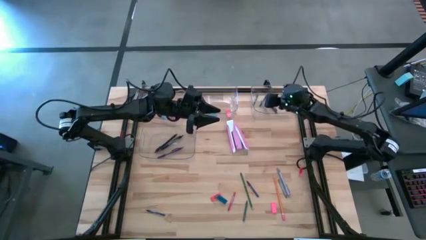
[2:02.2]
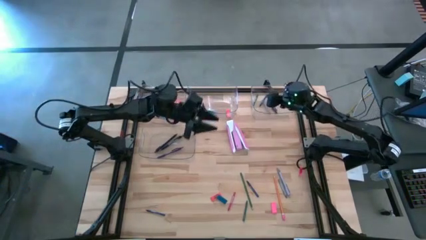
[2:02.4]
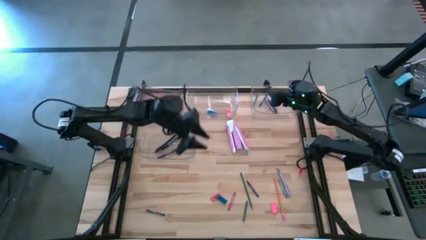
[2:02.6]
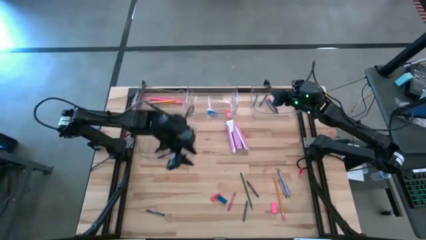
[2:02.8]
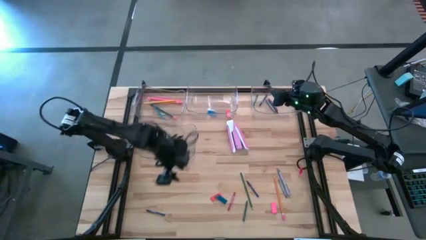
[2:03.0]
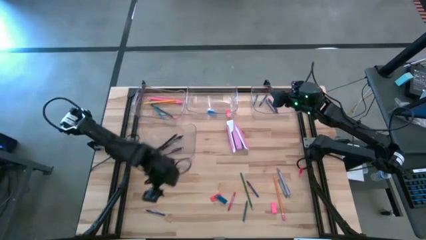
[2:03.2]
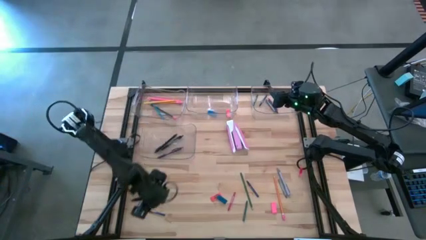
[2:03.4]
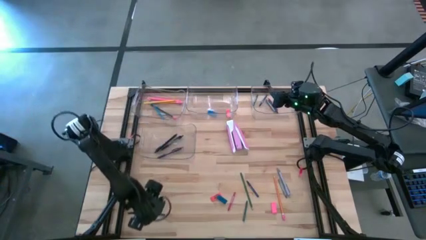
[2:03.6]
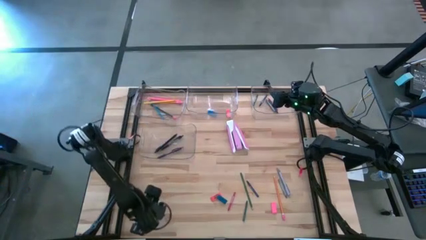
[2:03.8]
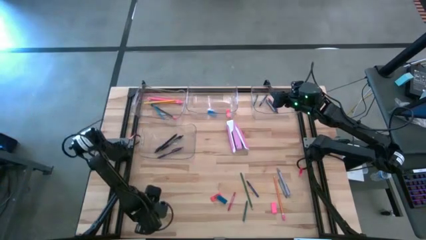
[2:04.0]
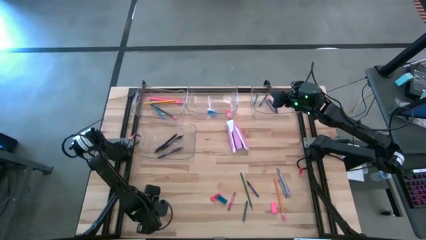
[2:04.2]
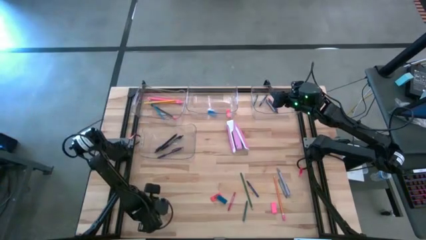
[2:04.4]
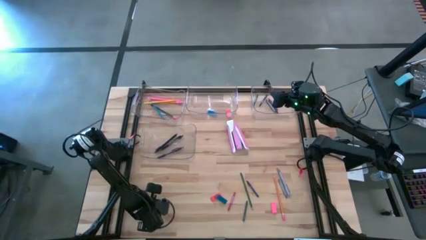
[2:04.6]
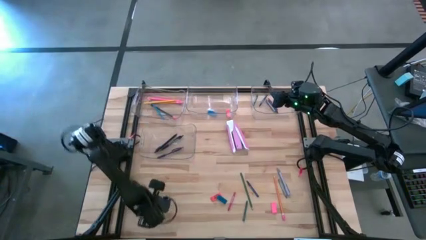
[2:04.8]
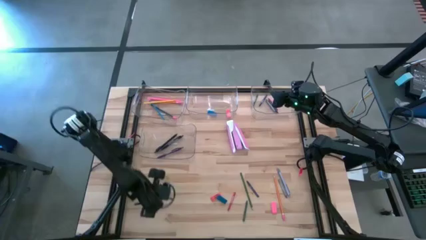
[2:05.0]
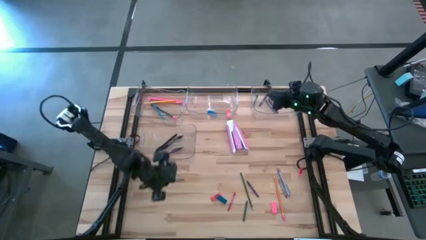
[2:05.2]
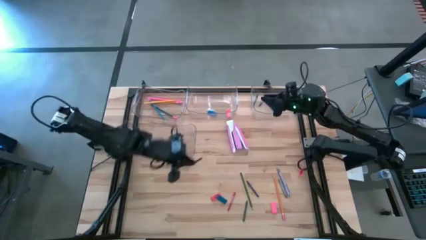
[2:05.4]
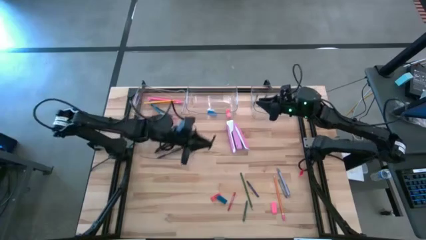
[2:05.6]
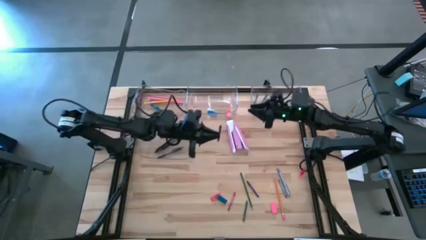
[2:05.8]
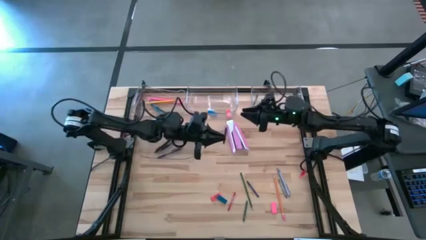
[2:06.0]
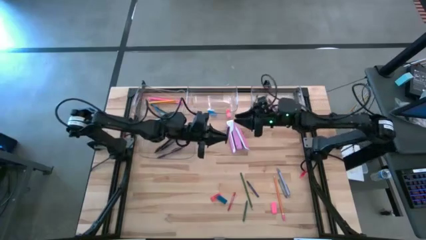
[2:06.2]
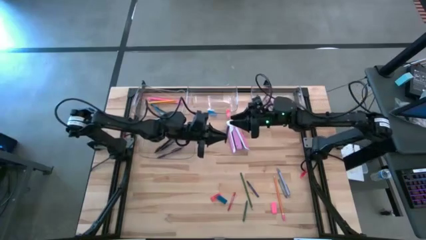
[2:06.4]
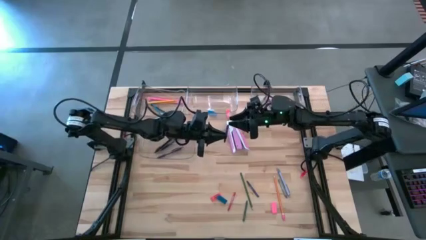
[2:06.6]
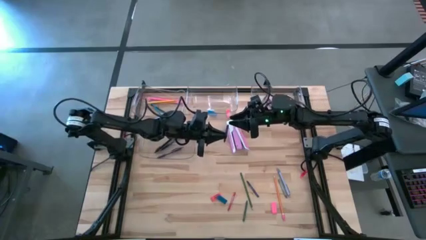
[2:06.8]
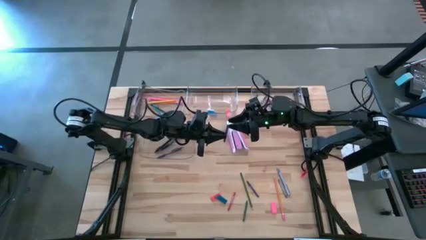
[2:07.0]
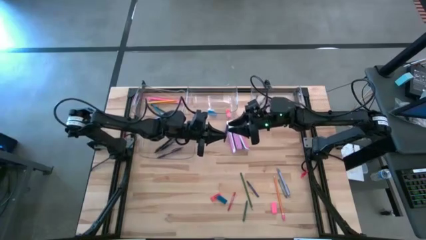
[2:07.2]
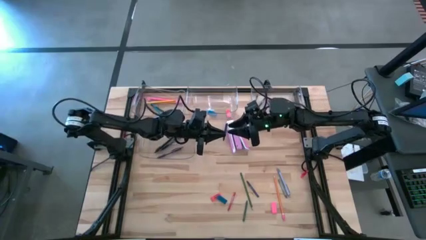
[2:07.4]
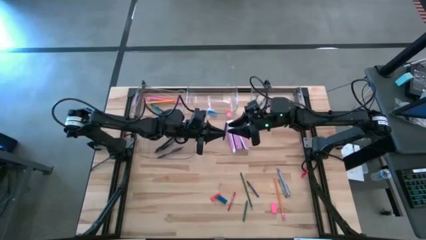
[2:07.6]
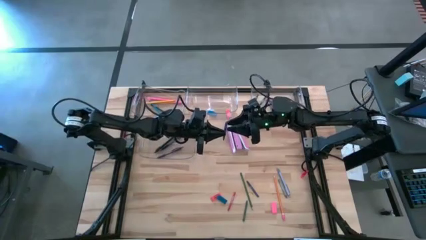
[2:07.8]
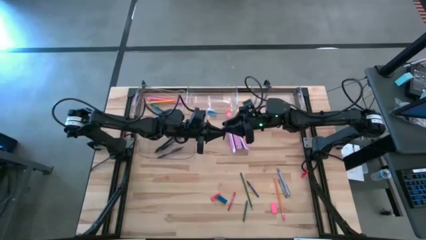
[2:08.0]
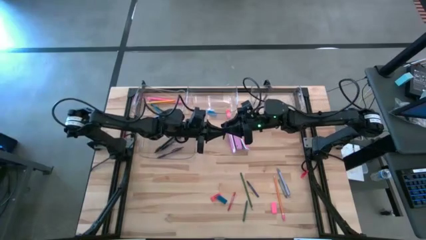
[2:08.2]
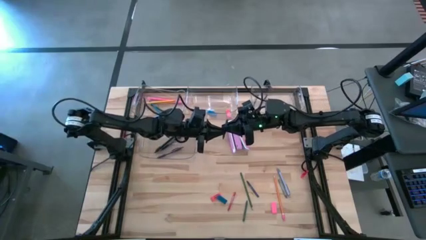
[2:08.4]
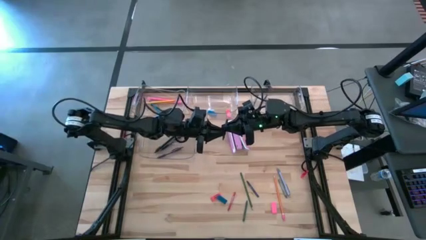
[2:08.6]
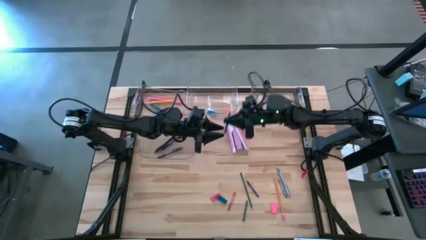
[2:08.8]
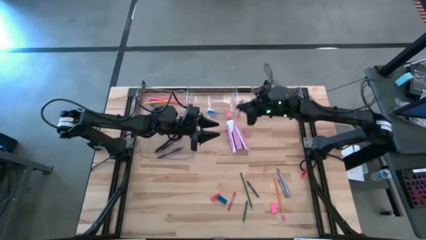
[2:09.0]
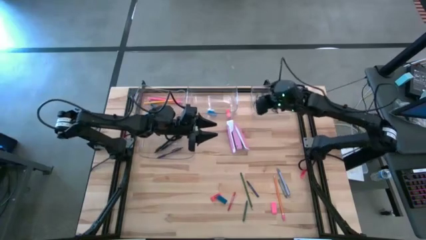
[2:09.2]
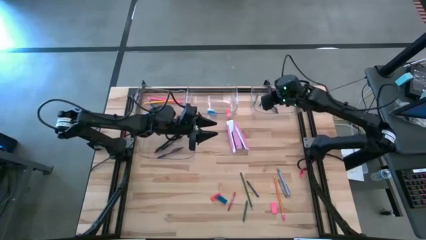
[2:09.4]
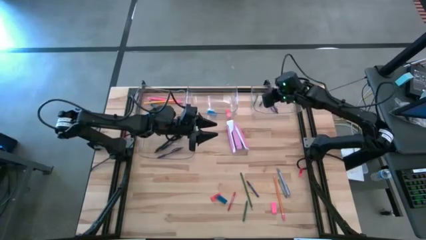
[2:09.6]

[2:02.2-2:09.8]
Task: Sort crayons/erasers/pens/pencils in bins
Put the blue crayon into the top right transparent bin

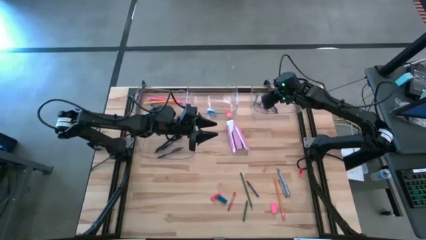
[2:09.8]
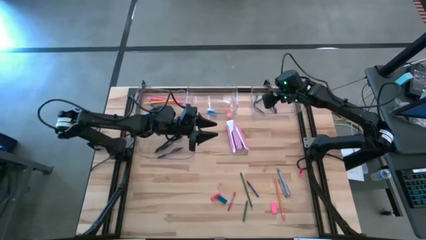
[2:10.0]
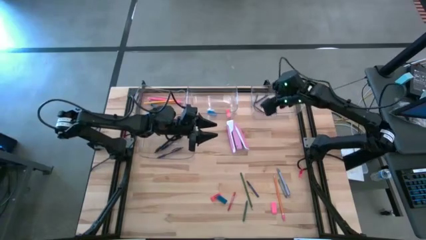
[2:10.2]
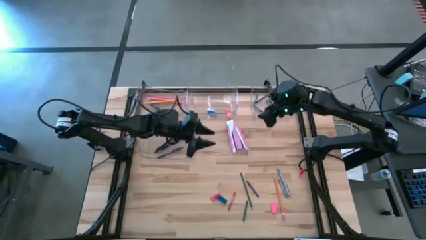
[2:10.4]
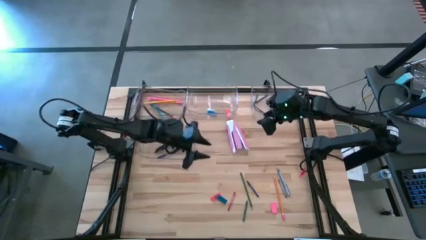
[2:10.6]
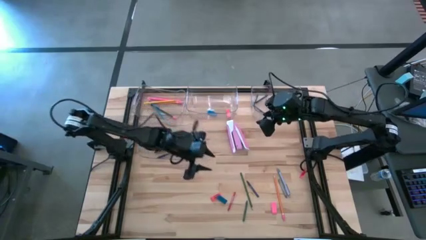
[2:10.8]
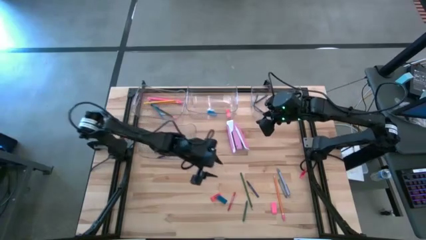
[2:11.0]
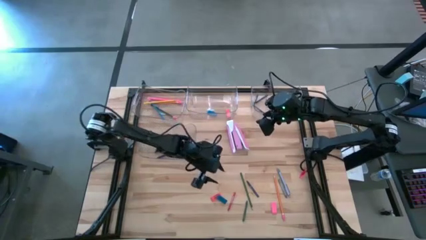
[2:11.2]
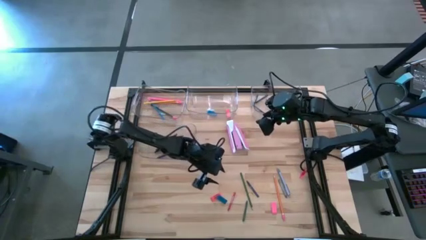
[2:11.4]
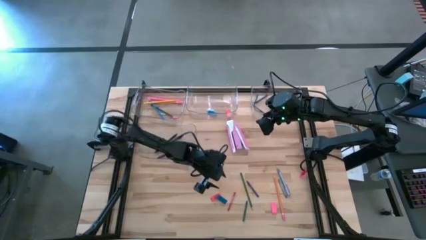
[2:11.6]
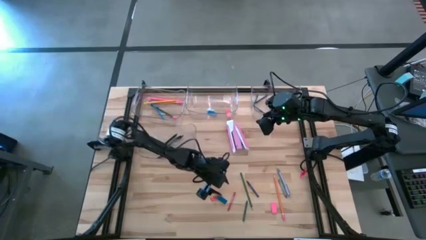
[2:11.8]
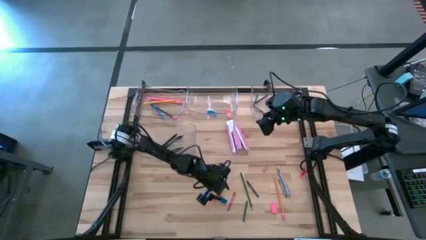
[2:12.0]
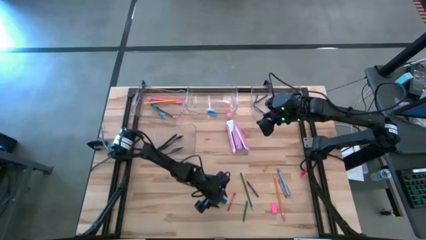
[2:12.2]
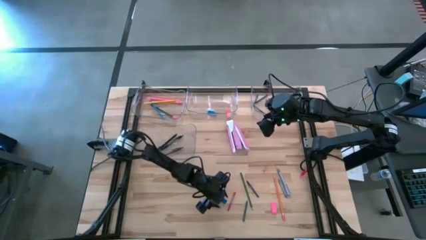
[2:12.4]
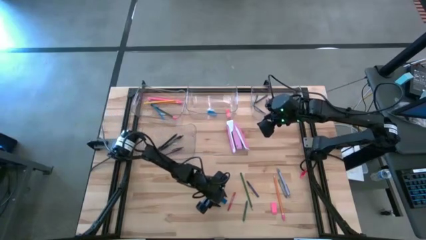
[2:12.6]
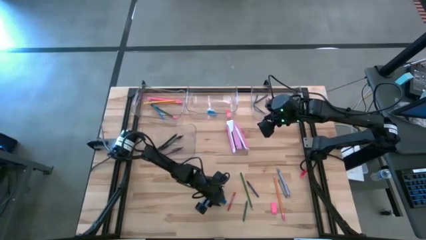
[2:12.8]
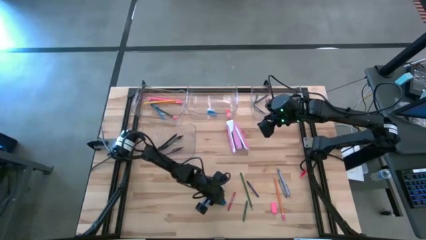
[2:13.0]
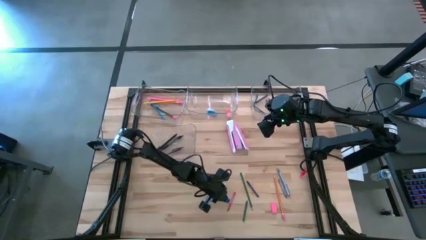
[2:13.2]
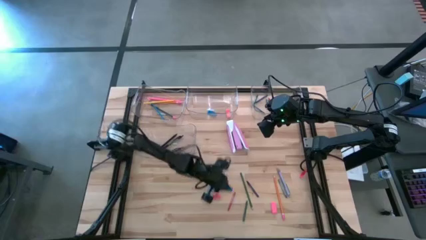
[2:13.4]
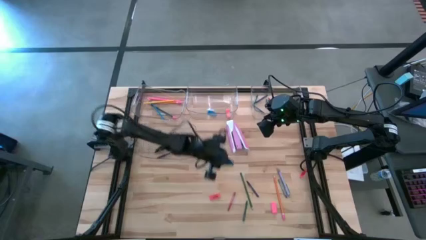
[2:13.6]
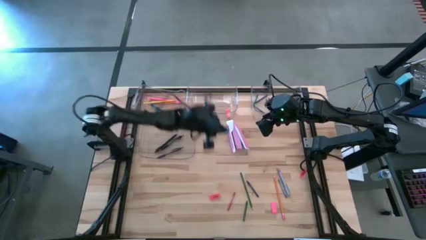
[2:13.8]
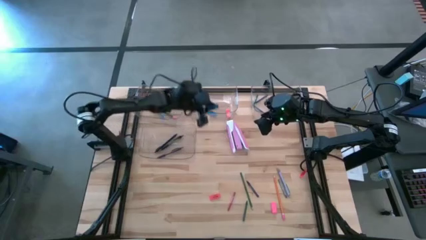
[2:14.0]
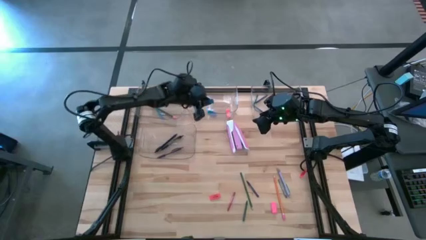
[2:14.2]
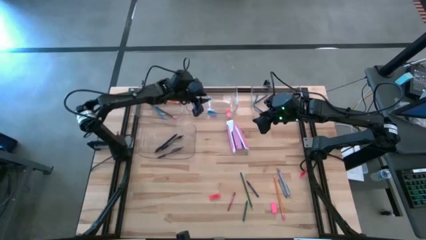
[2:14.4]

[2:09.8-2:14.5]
Put the blue eraser into the middle transparent bin

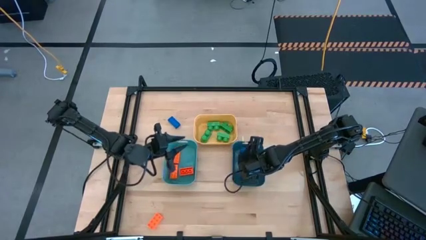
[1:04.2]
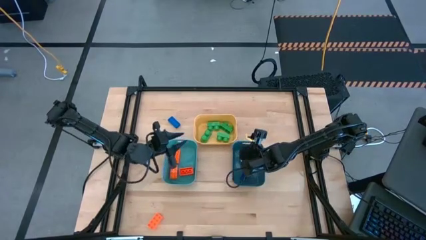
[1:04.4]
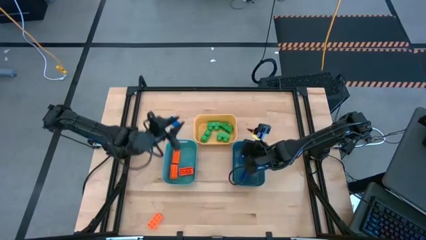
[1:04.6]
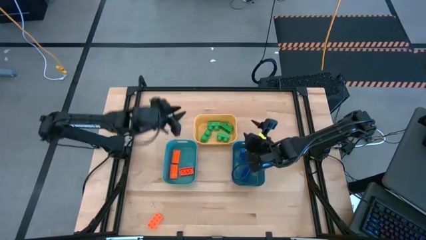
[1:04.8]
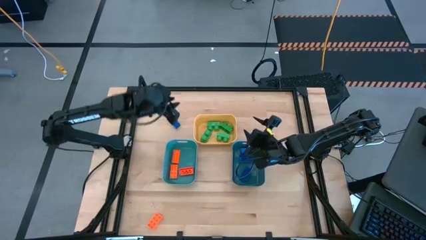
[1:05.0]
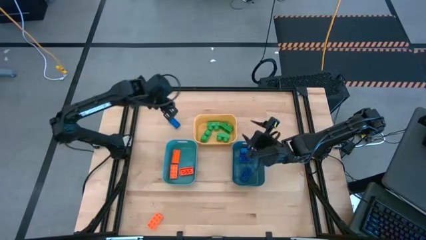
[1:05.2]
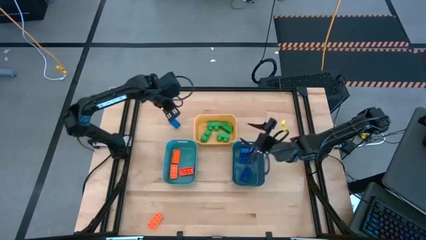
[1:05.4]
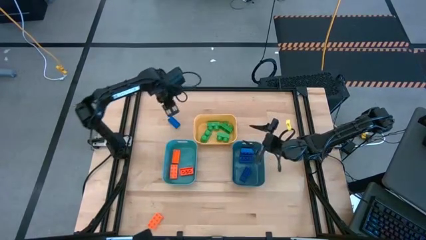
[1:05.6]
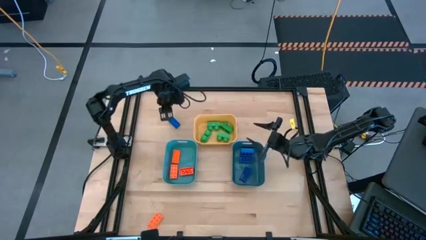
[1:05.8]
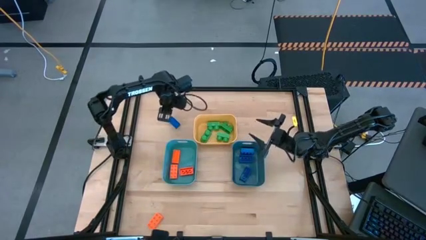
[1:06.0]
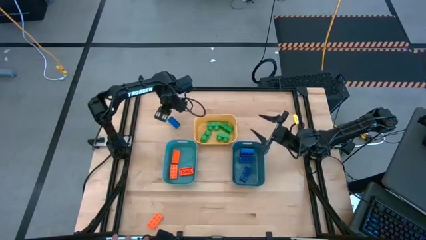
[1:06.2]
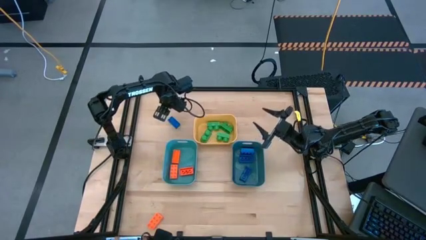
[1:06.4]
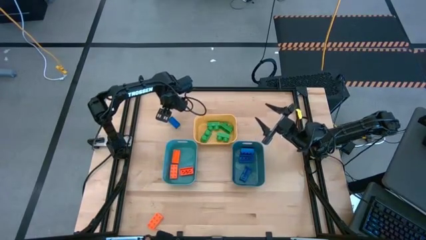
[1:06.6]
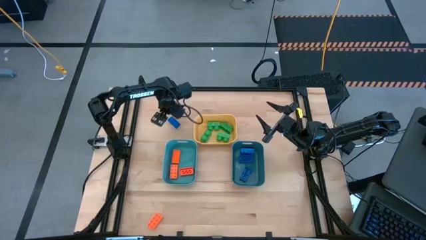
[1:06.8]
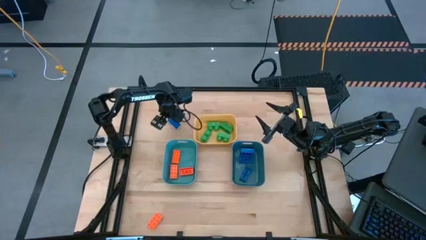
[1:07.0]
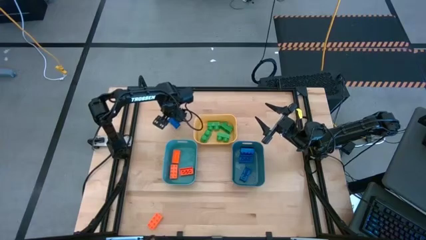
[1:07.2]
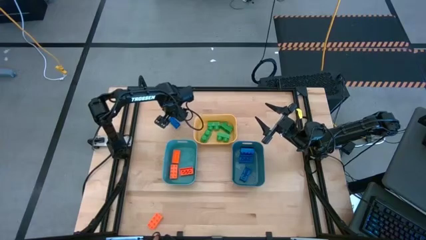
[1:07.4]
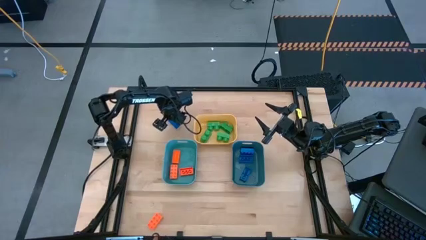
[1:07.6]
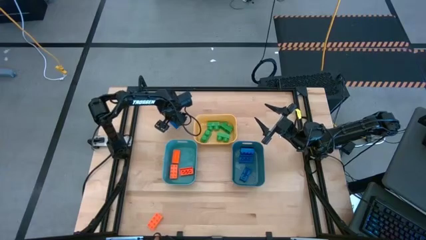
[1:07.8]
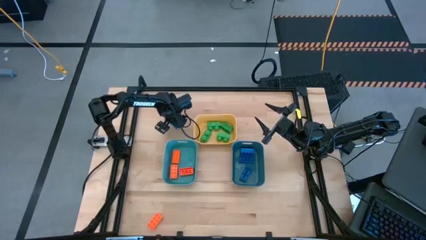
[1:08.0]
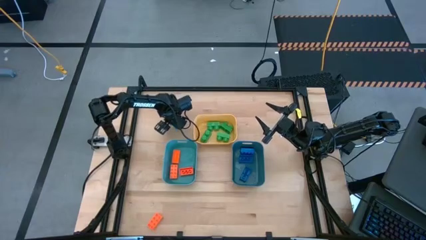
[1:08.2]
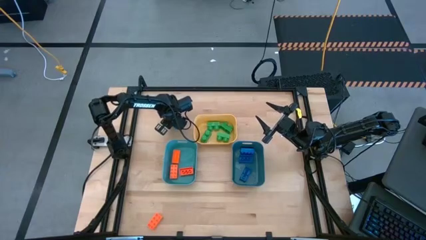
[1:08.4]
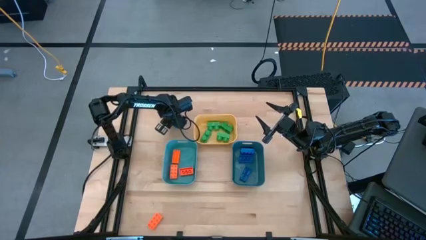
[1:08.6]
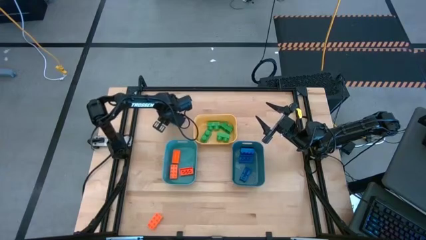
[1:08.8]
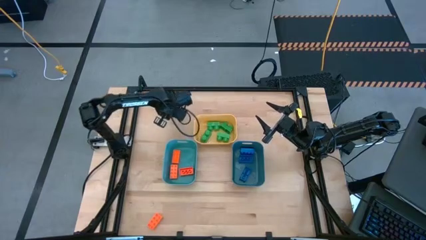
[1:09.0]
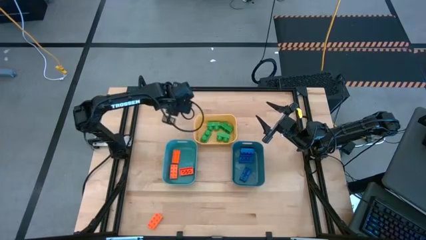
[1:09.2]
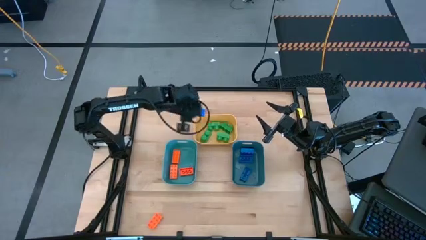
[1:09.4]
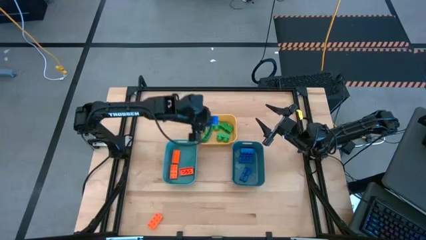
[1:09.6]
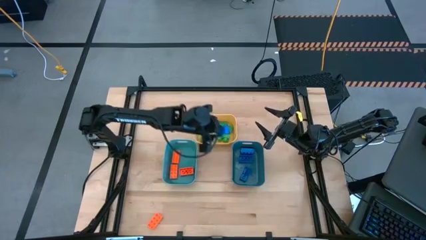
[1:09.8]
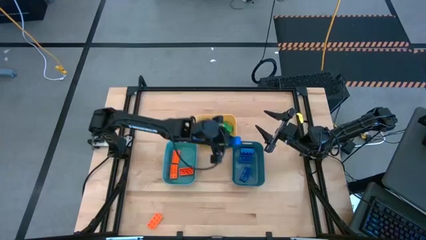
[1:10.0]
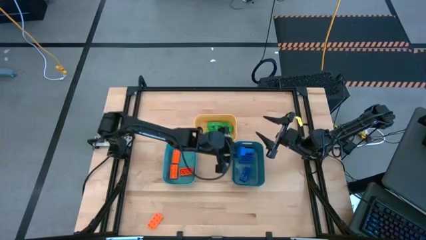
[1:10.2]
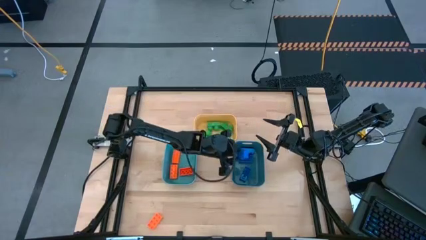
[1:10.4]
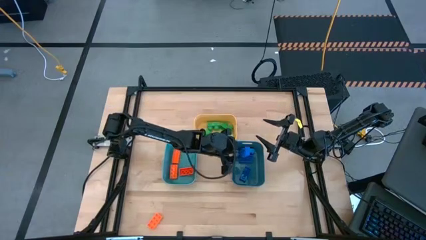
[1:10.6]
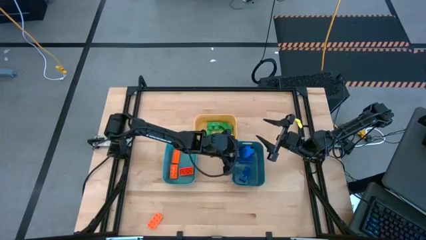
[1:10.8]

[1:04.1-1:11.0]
Task: Sort & place blocks by color
Put the blue game piece into the blue bin
